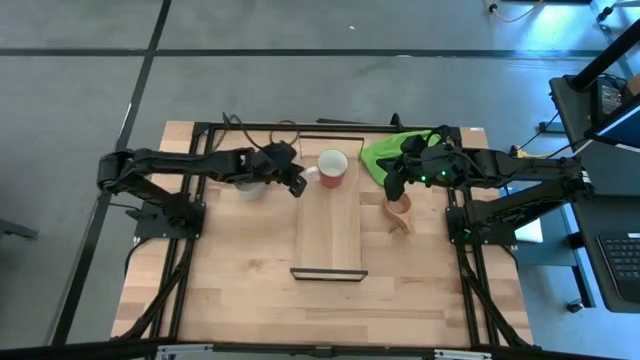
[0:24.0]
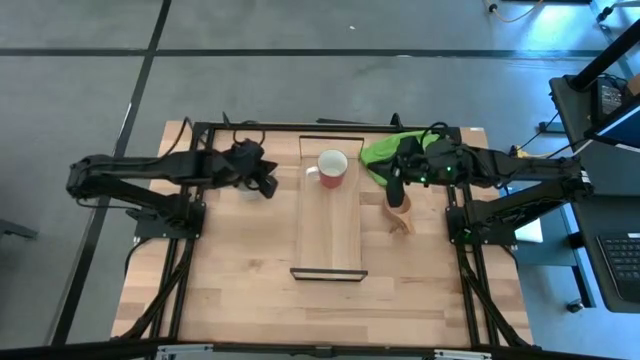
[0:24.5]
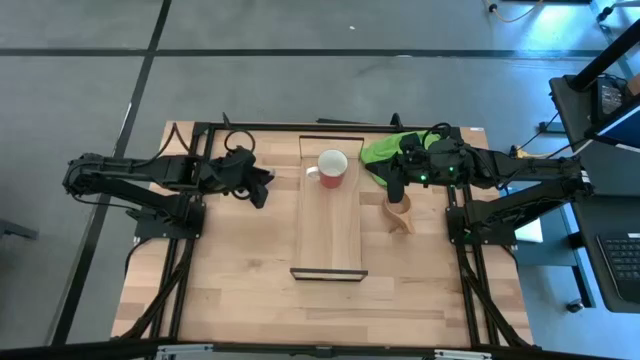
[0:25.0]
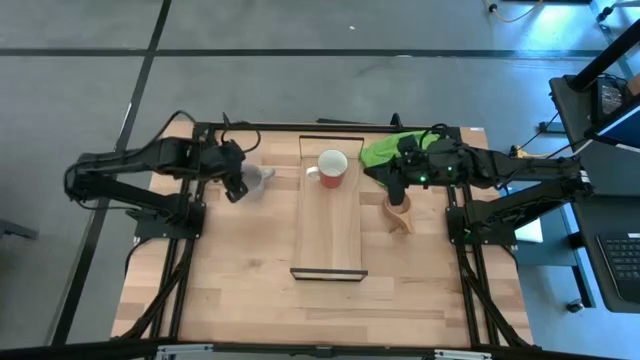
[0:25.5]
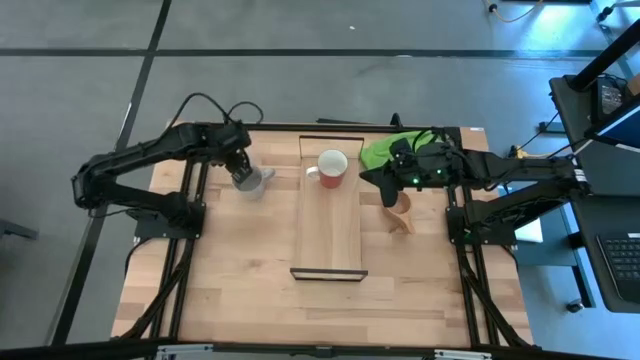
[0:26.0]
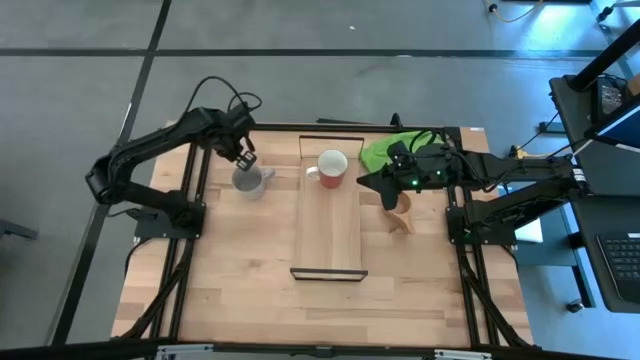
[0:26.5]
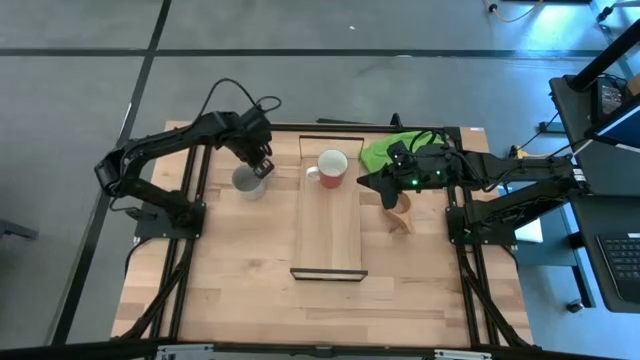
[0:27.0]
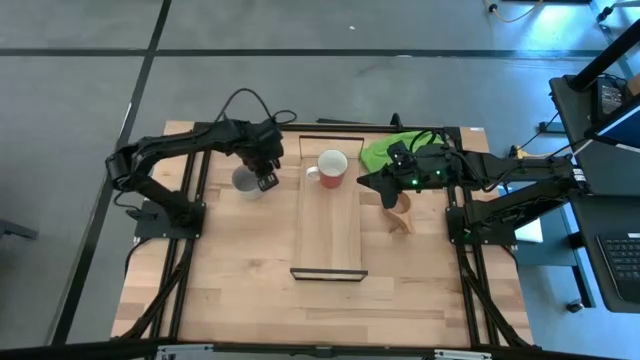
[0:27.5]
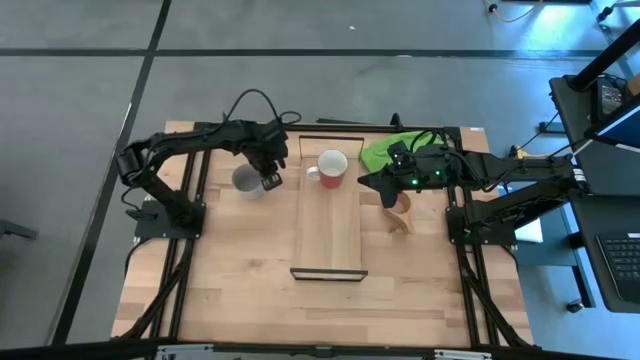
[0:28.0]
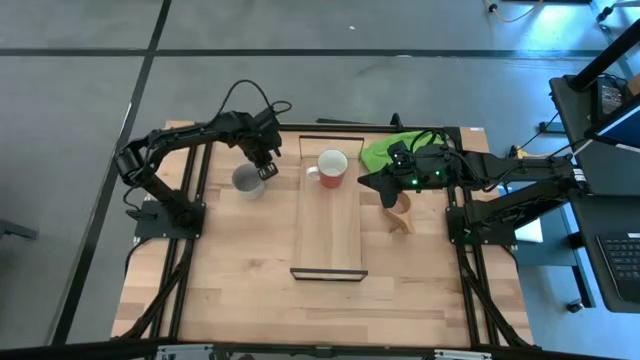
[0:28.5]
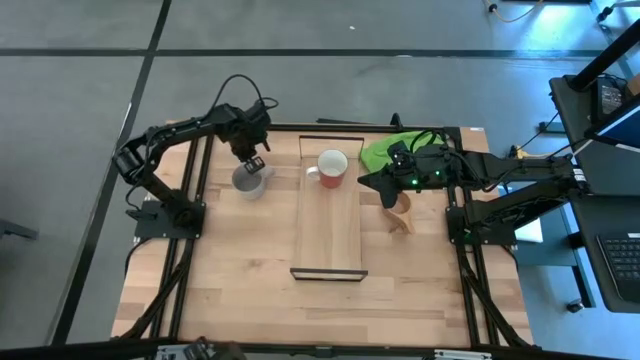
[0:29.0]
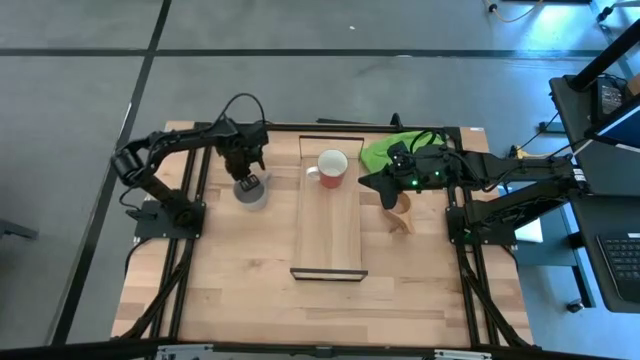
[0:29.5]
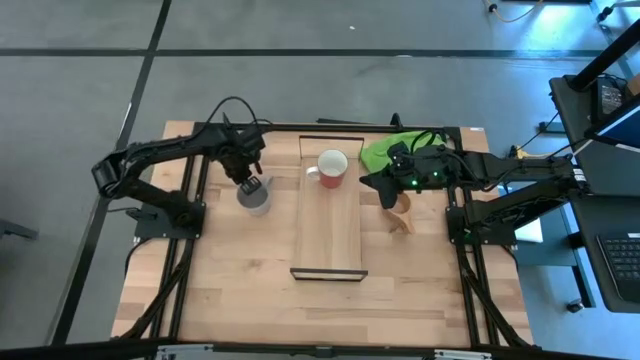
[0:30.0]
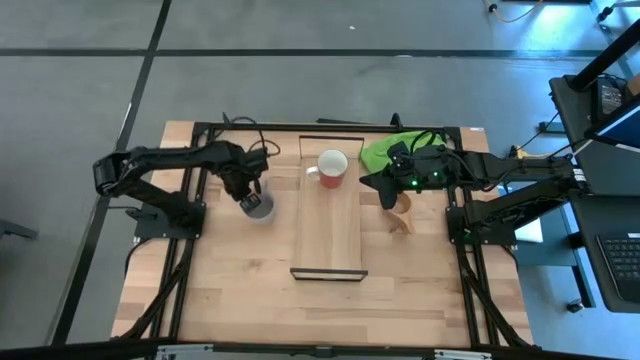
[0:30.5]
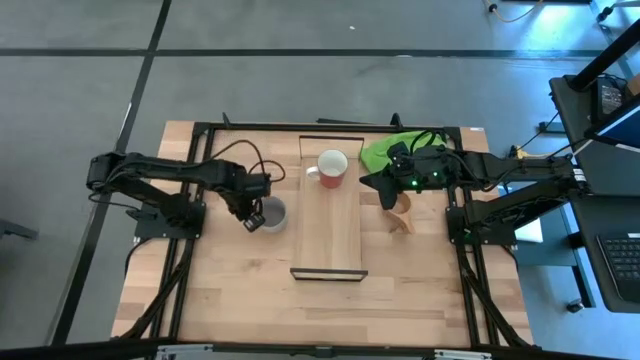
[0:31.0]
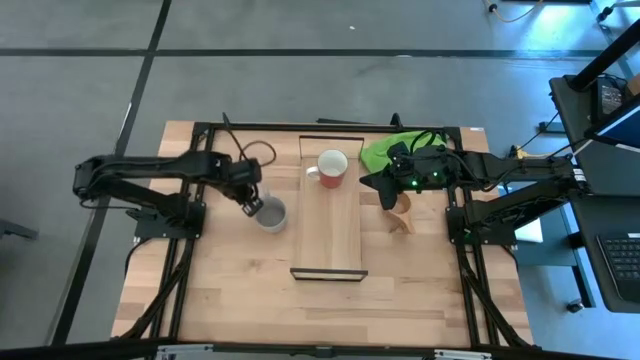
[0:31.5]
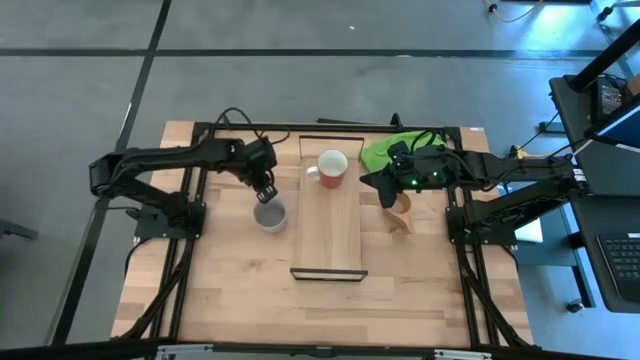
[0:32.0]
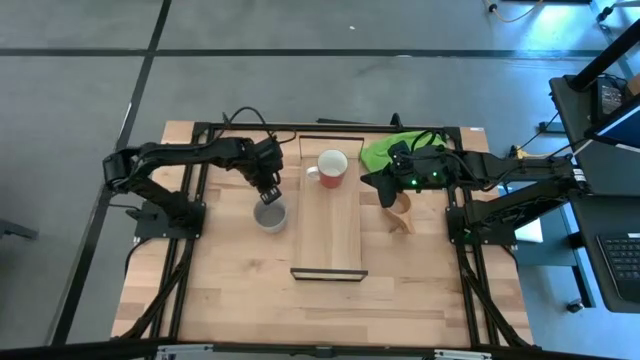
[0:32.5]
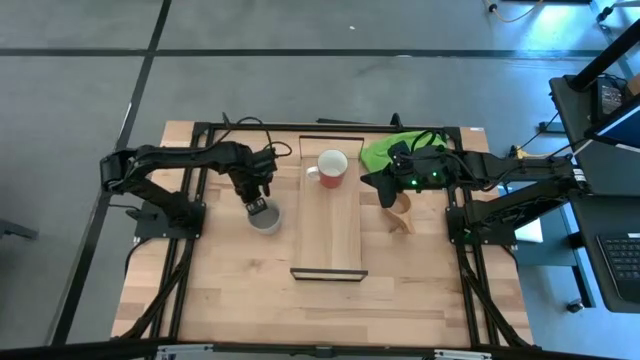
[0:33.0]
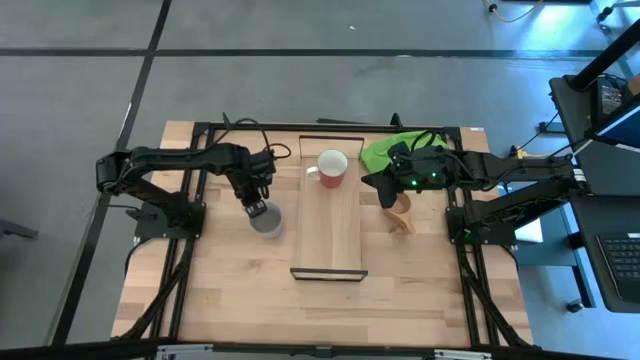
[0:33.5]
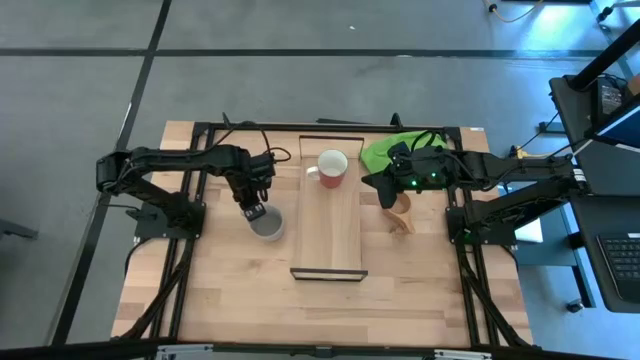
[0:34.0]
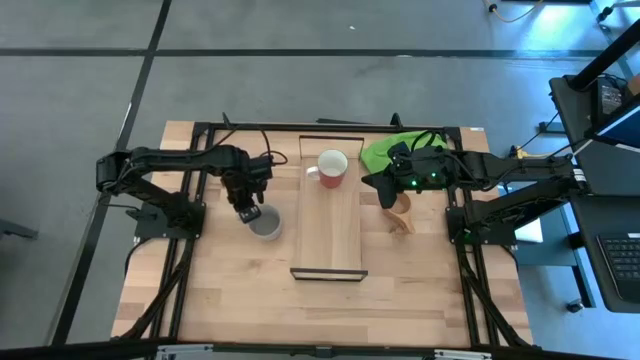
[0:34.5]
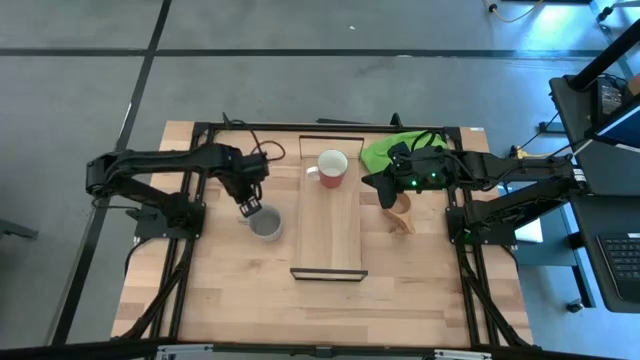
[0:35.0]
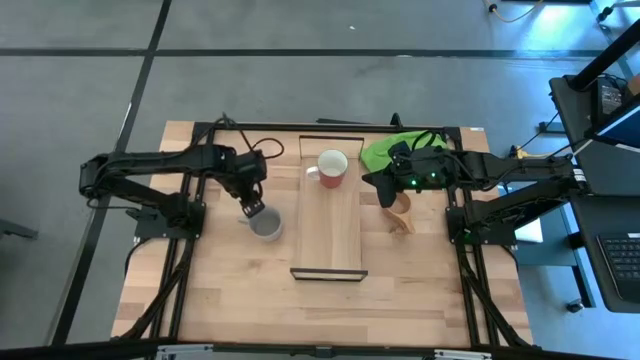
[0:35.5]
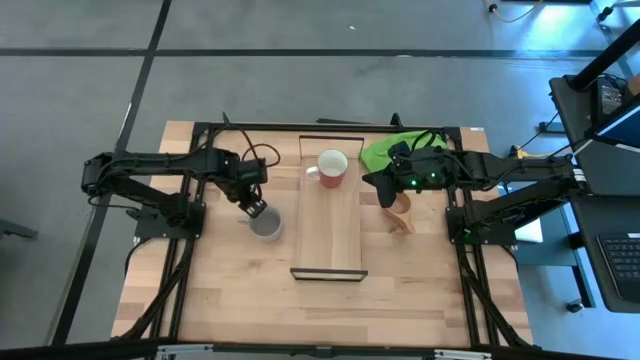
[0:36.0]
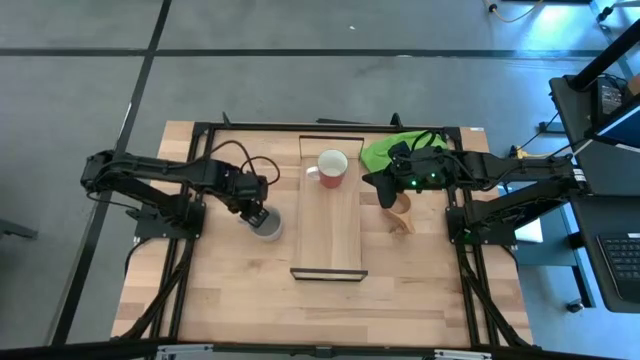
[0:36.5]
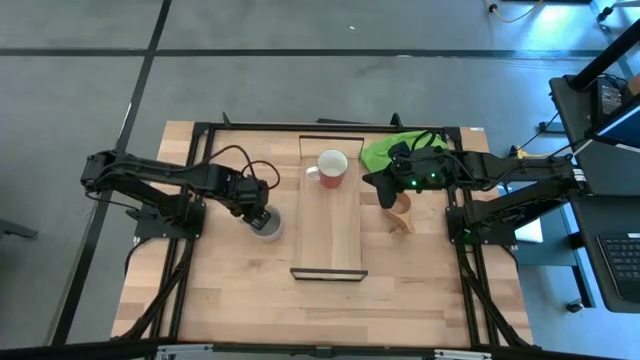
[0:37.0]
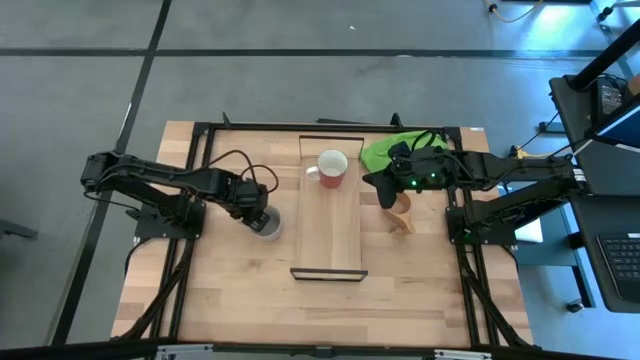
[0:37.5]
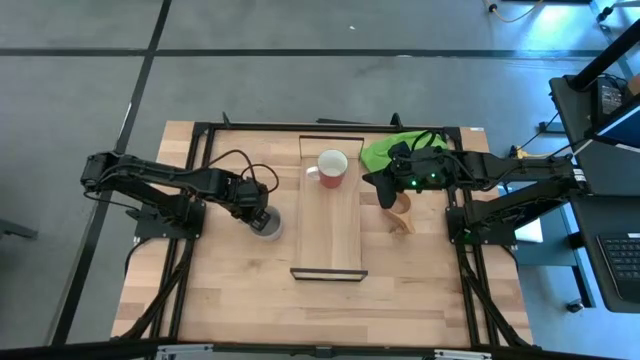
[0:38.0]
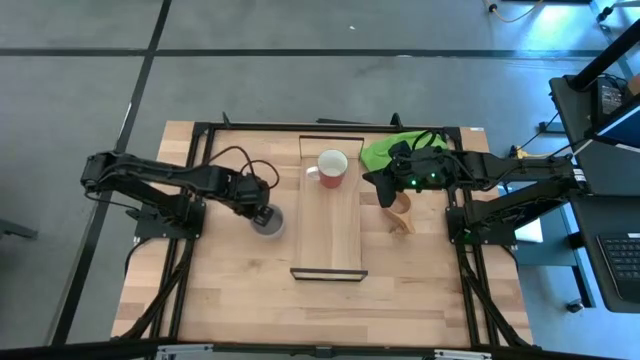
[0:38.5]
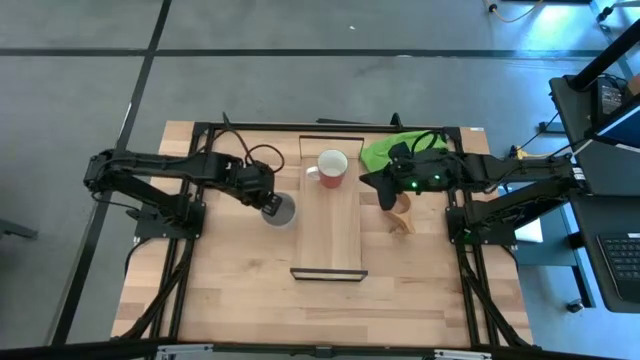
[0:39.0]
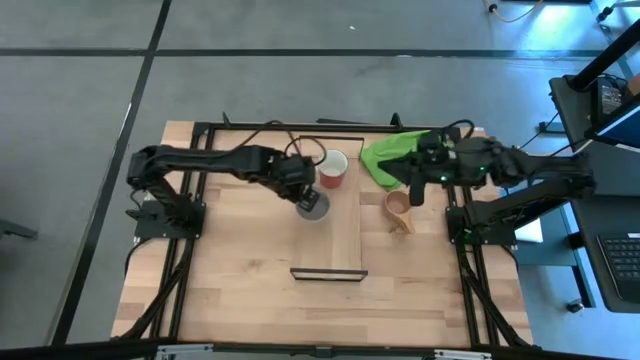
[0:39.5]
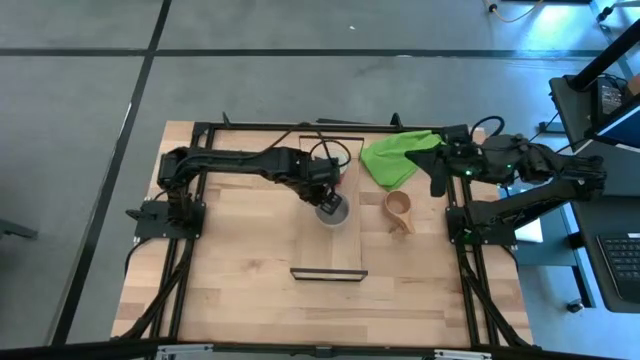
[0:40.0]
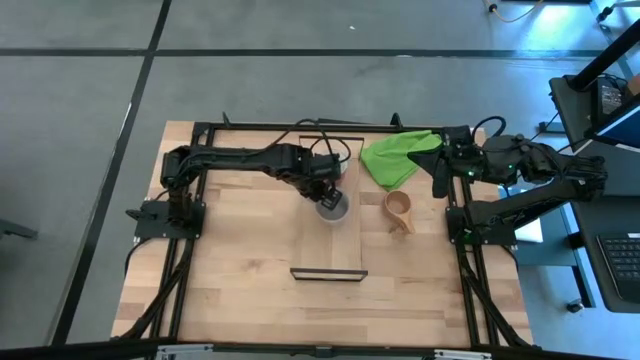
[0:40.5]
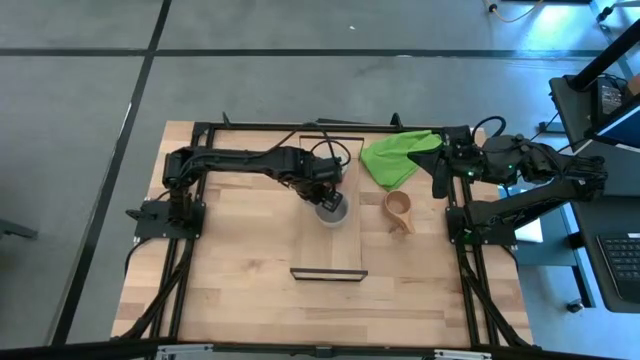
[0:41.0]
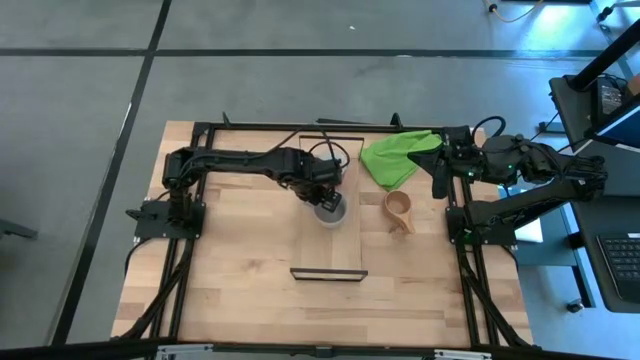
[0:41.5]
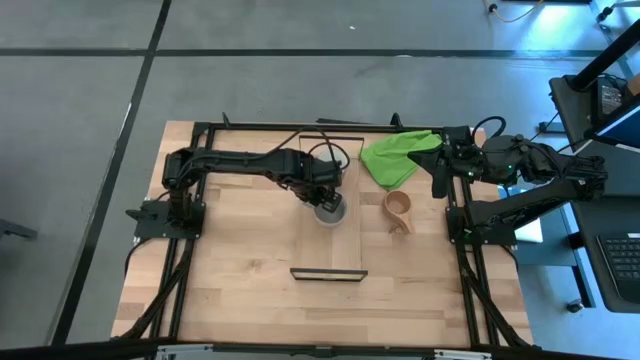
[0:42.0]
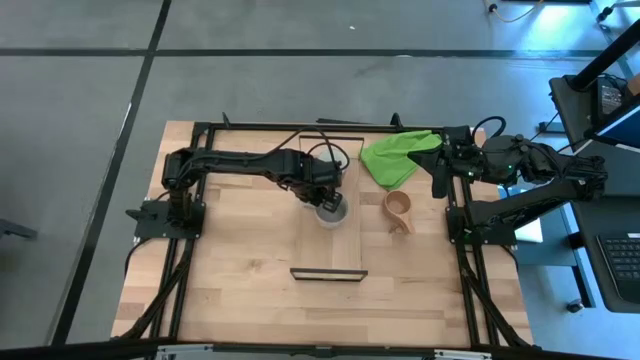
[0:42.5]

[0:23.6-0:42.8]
Task: Stack small to large cups/mugs on shelf
Put the gray mug on the shelf
